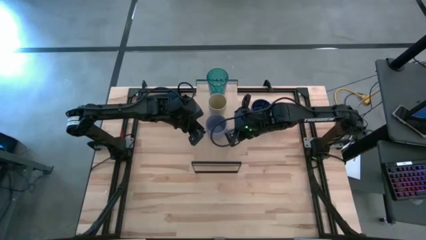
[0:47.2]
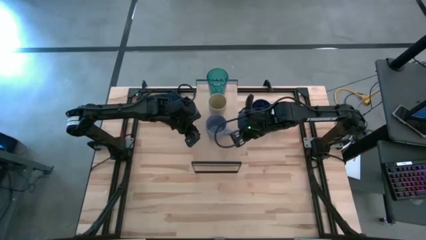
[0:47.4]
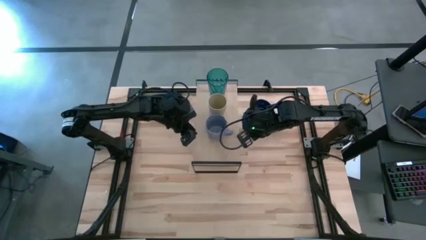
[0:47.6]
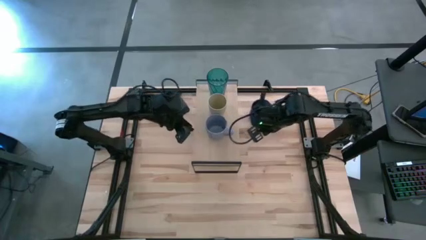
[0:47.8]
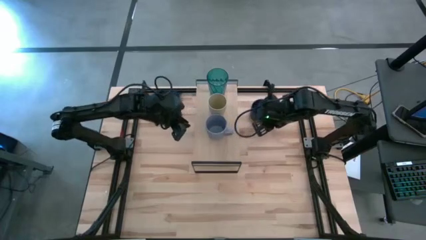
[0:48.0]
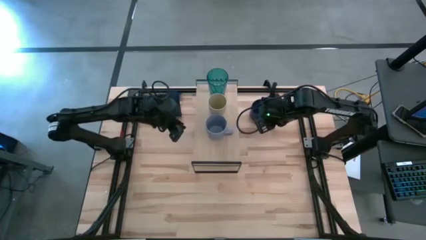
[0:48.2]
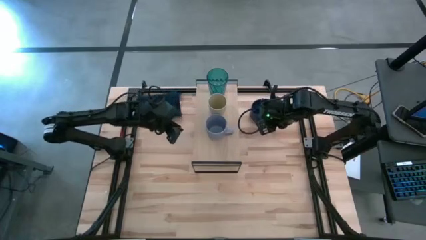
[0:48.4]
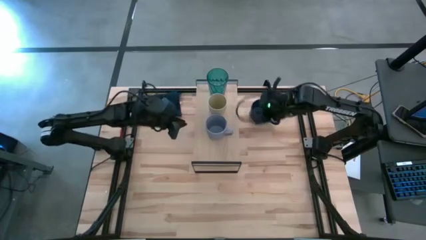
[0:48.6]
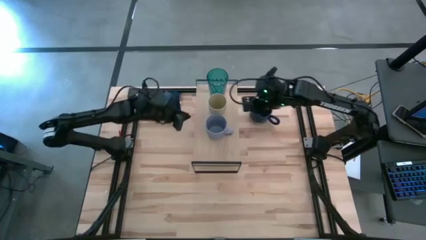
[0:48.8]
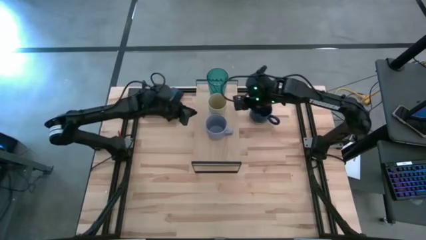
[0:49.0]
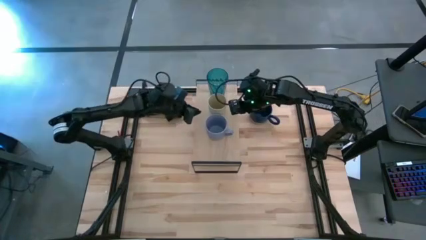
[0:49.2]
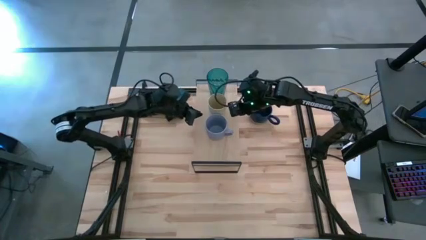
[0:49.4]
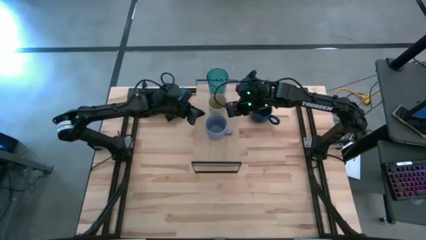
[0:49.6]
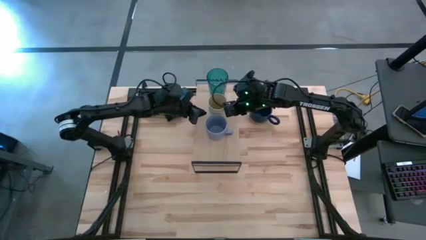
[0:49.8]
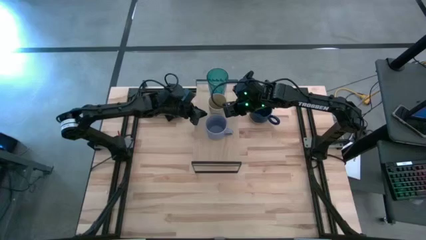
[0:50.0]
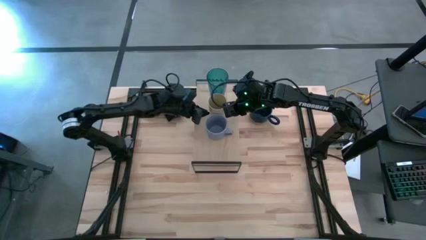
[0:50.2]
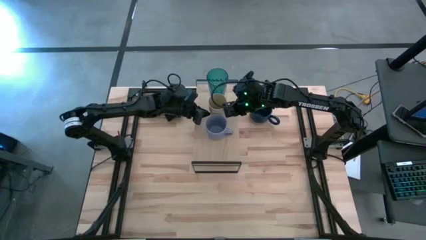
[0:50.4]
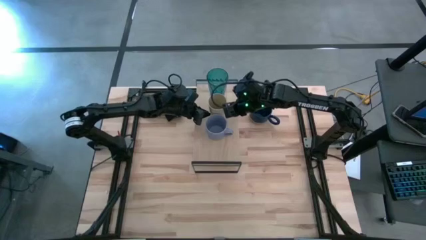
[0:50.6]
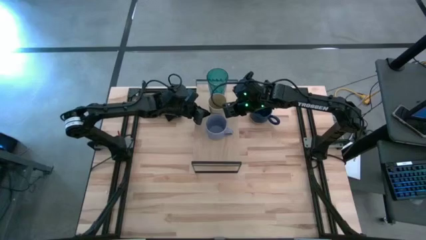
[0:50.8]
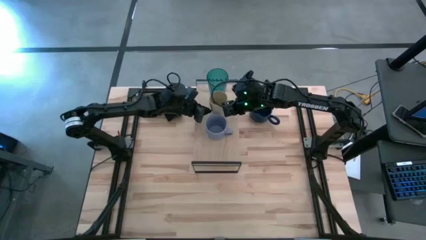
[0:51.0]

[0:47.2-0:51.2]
Task: Stack small to large cups/mugs on shelf
Adjust the light yellow cup on the shelf

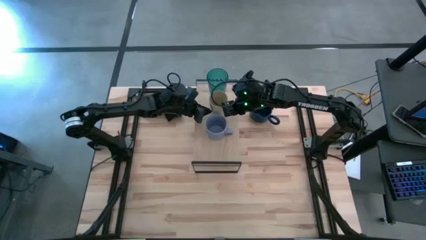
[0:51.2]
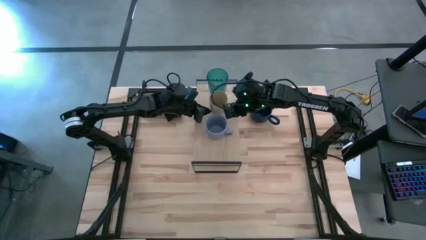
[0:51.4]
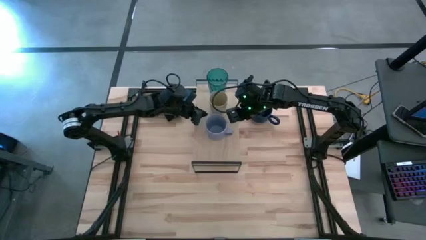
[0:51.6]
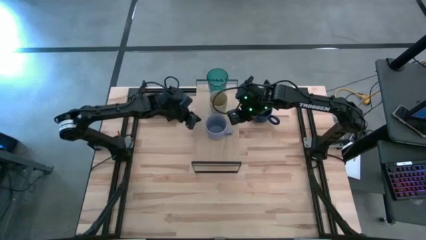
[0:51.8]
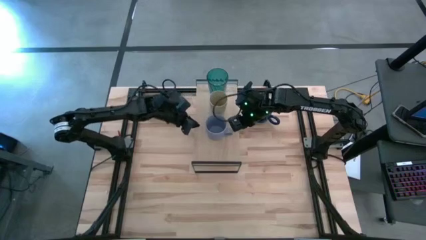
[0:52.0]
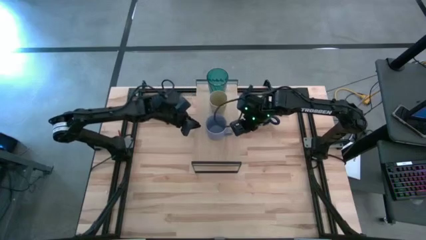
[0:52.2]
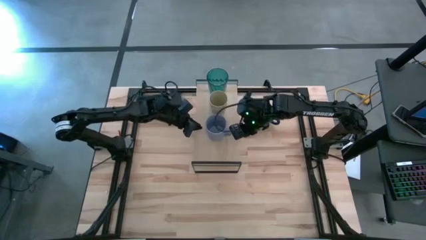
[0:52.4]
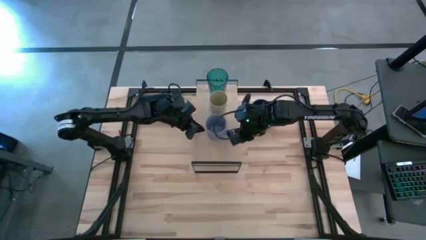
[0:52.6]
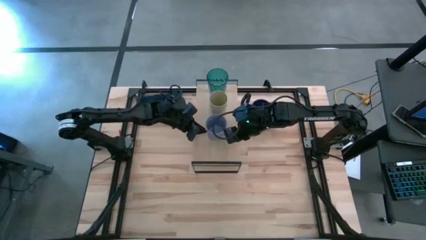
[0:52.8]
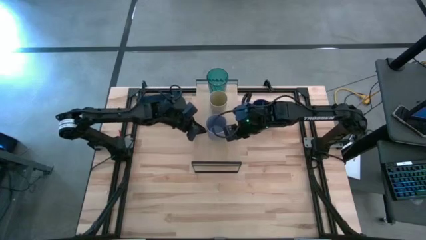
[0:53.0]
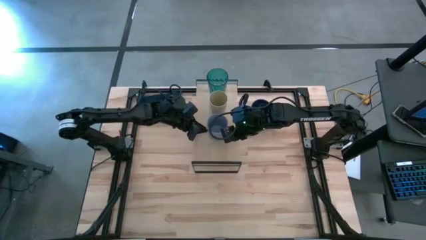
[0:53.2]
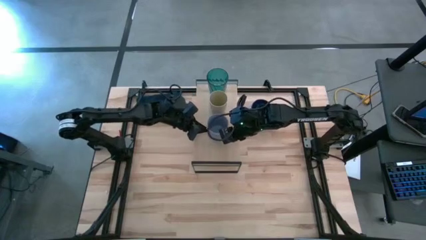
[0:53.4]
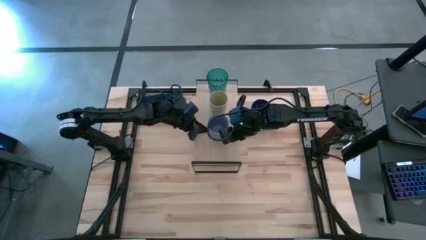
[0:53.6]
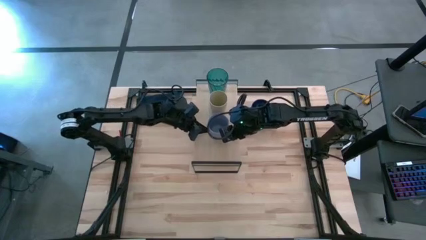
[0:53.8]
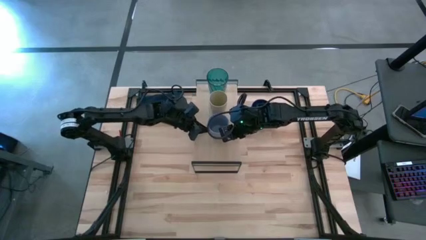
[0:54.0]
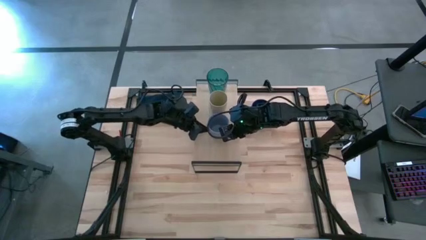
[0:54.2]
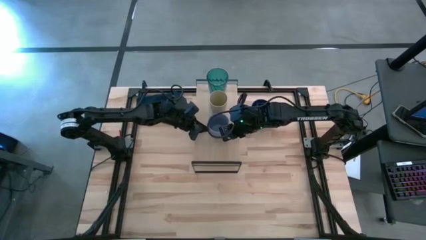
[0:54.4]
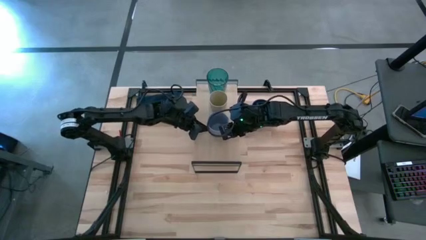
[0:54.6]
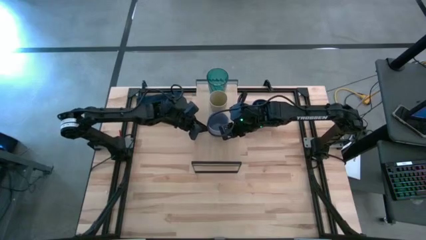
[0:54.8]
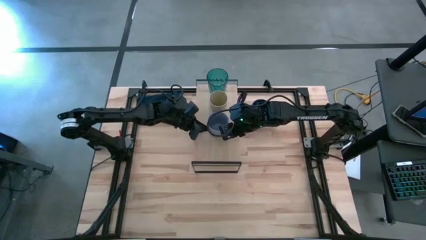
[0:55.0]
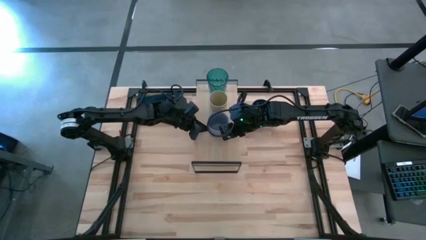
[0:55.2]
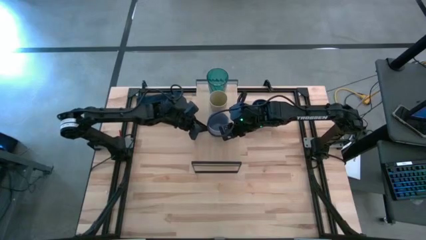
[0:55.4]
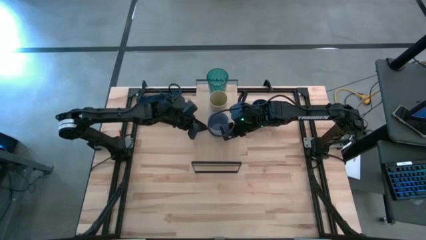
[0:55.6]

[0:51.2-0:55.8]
Adjust the purple mug on the shelf

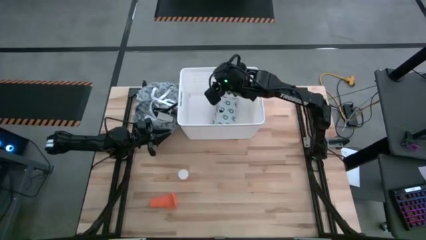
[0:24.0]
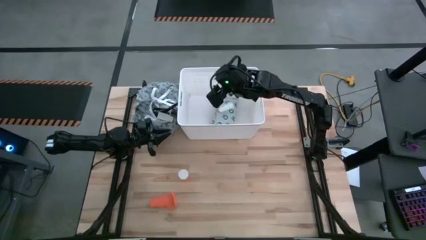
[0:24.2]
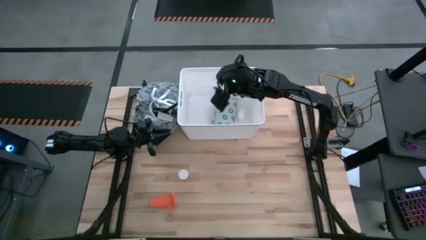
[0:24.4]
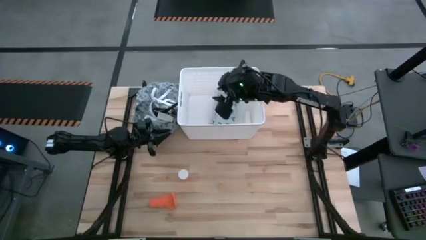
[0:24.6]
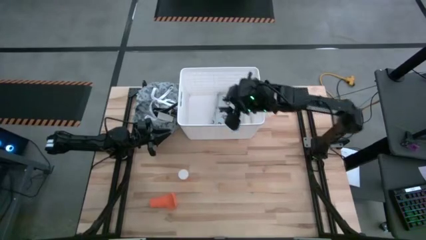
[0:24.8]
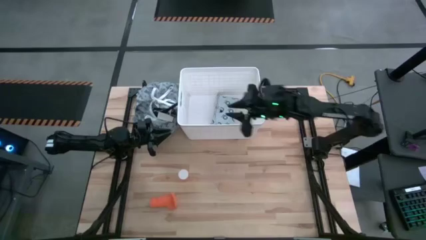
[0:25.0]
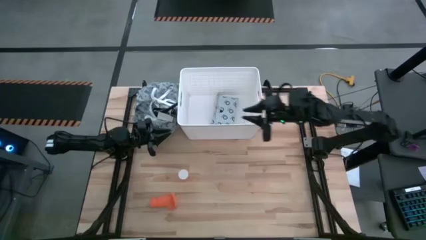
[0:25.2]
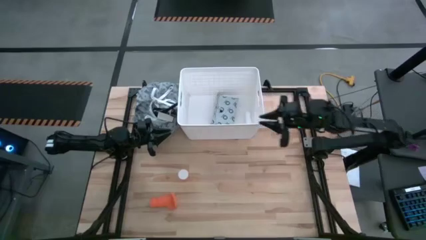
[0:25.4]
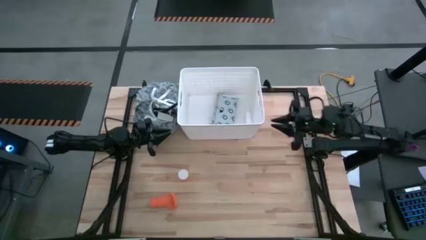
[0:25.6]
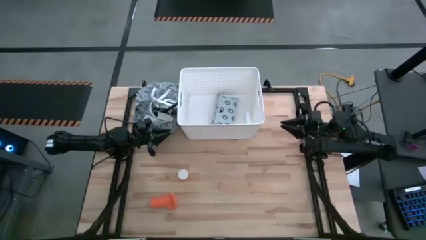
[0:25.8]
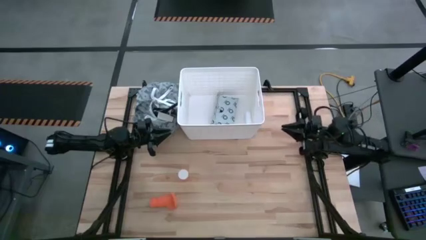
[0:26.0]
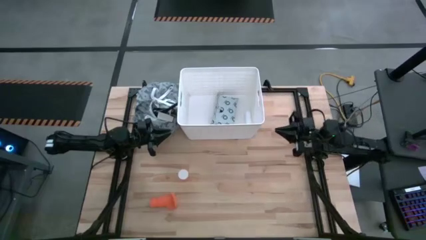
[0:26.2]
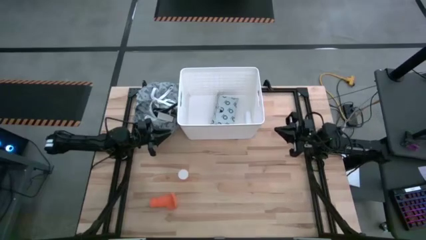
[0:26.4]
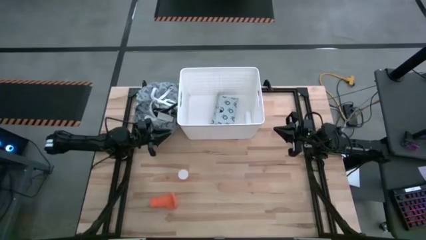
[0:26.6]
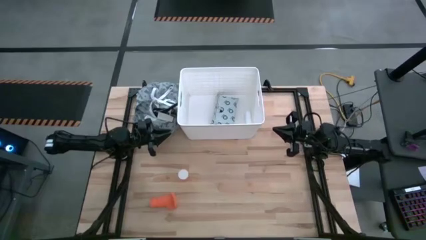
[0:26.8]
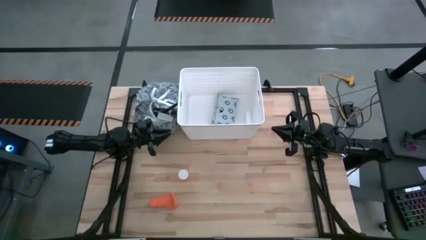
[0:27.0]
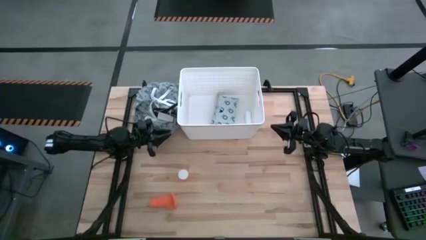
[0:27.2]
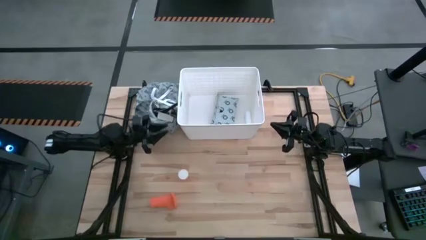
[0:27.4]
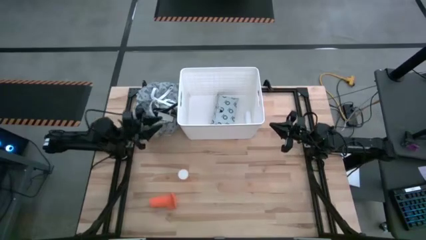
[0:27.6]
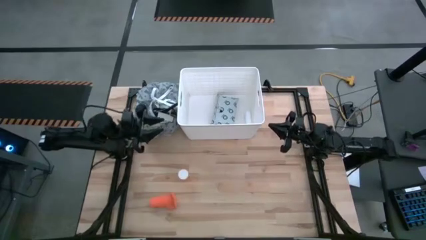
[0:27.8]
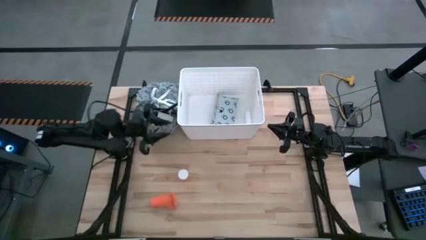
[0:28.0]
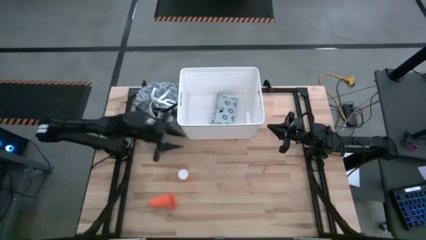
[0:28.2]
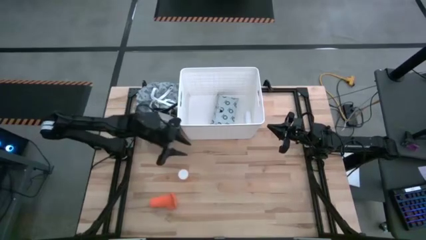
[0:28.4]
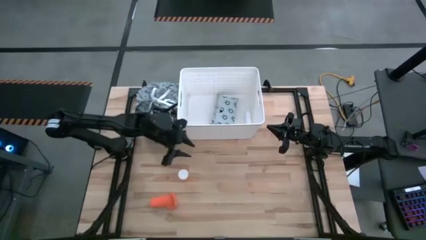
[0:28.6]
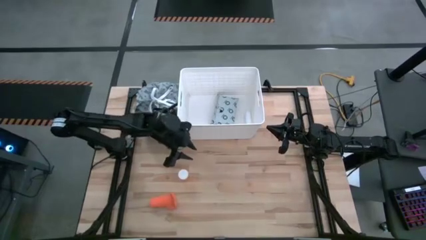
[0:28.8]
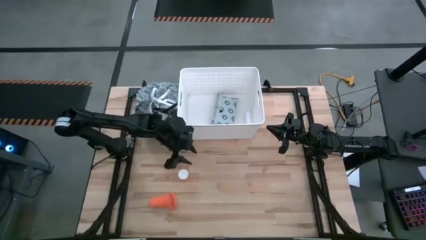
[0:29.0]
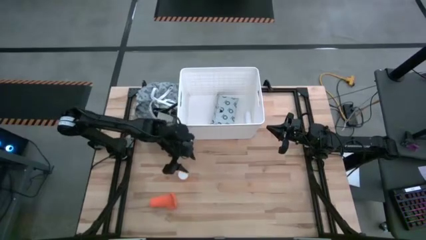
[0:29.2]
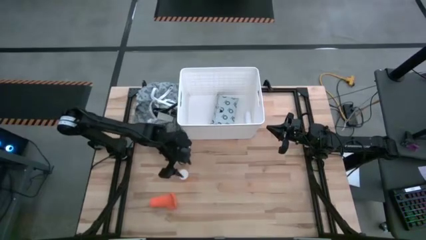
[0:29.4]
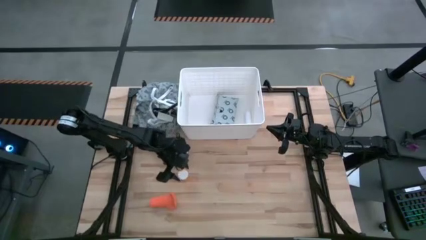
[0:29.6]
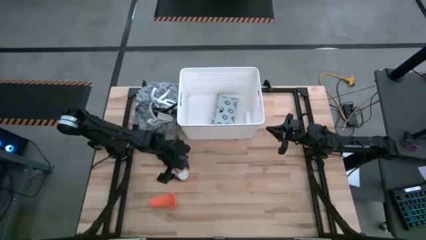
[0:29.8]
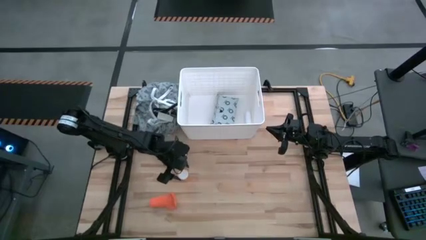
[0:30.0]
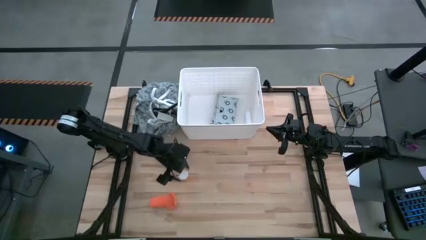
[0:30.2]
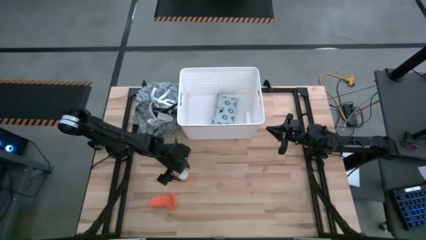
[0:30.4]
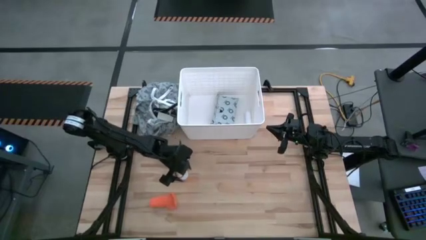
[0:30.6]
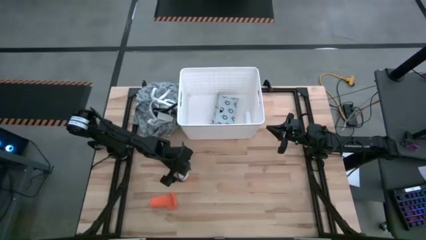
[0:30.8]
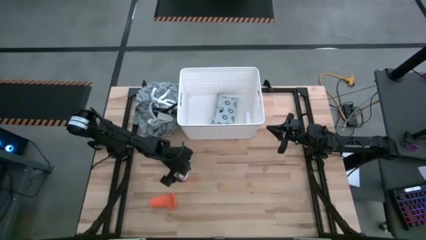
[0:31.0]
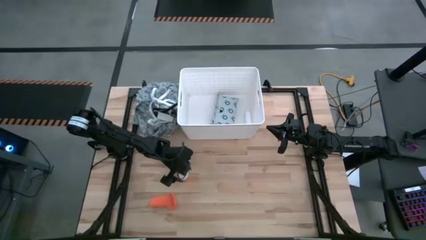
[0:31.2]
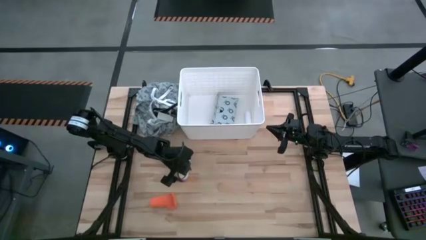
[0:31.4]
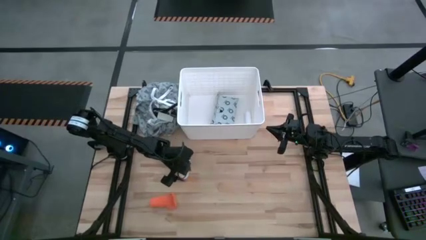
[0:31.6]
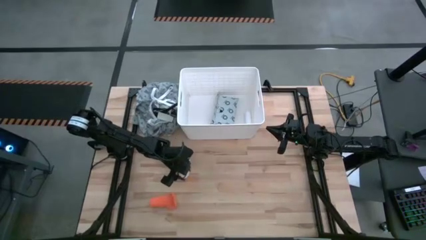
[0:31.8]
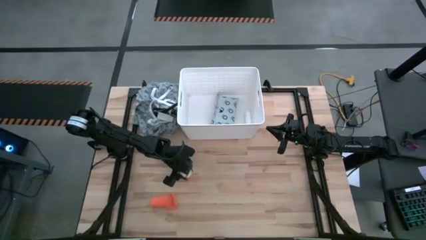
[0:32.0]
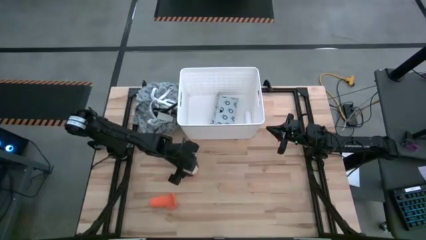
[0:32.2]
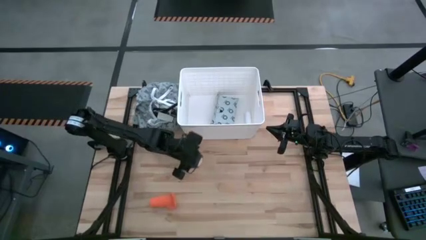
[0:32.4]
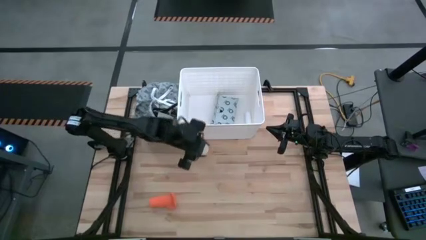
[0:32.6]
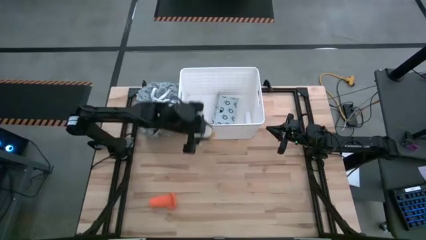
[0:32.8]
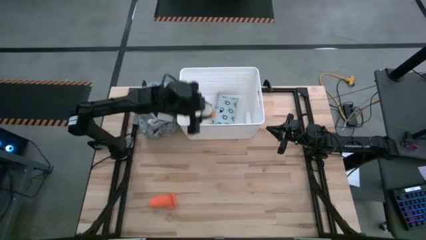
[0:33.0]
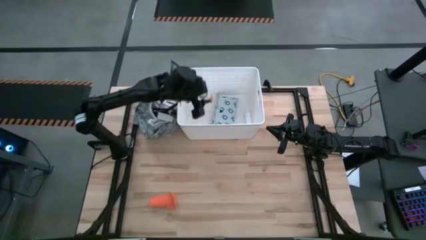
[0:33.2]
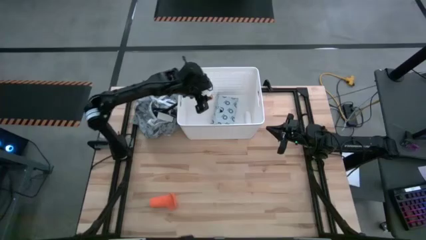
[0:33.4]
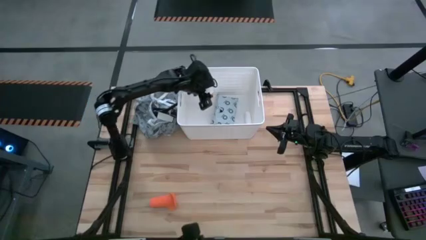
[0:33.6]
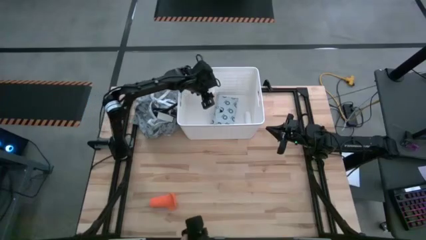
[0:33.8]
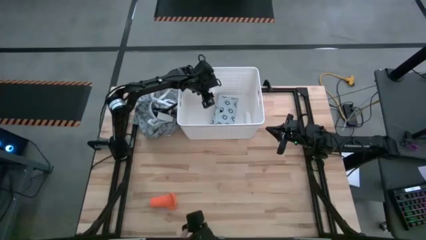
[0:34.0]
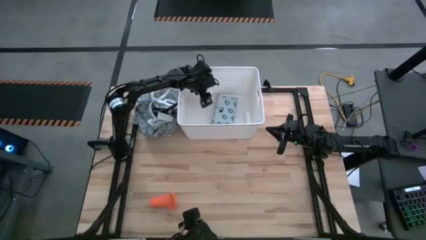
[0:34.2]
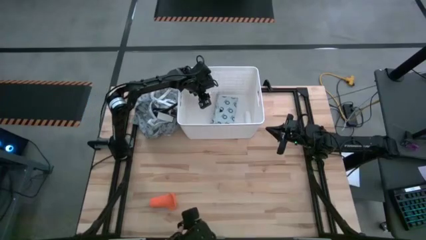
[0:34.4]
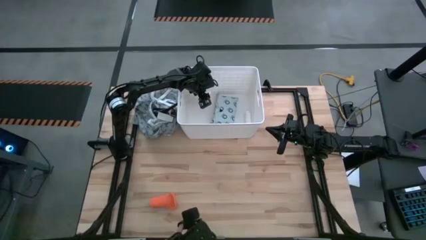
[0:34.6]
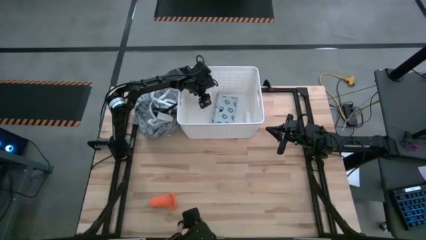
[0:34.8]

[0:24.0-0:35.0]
Task: Pick & place medical supplies in basket/bin
Put the orange pill bottle into the white bin
